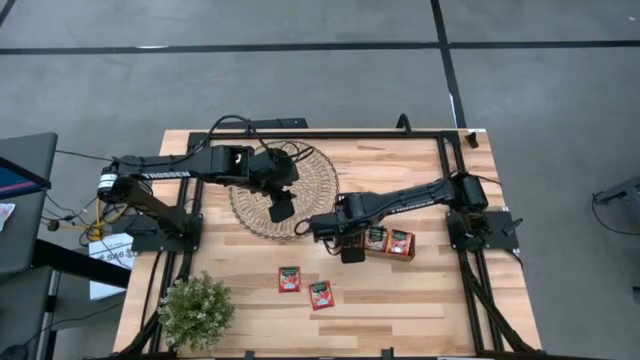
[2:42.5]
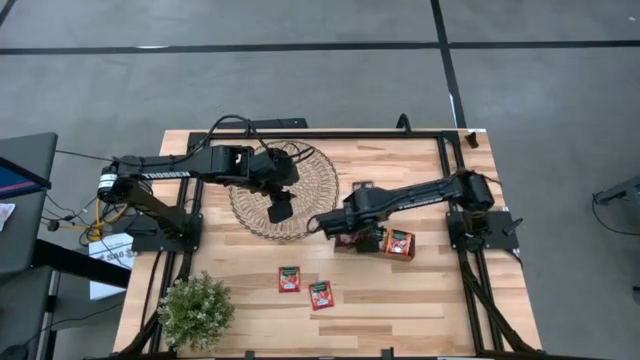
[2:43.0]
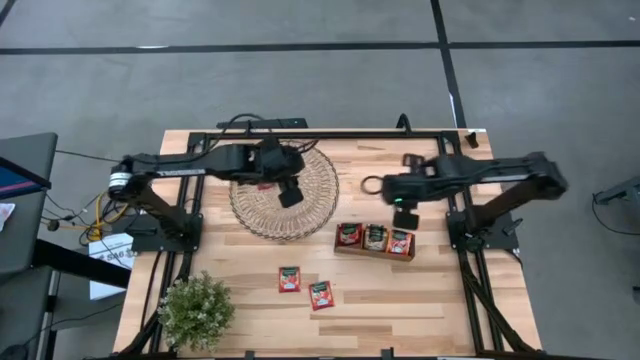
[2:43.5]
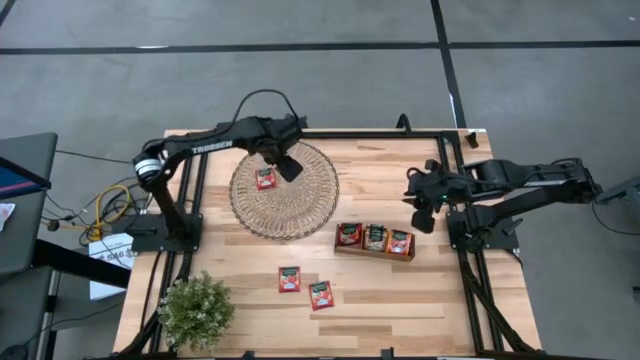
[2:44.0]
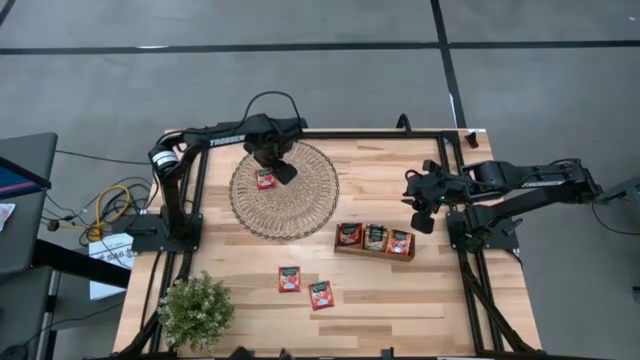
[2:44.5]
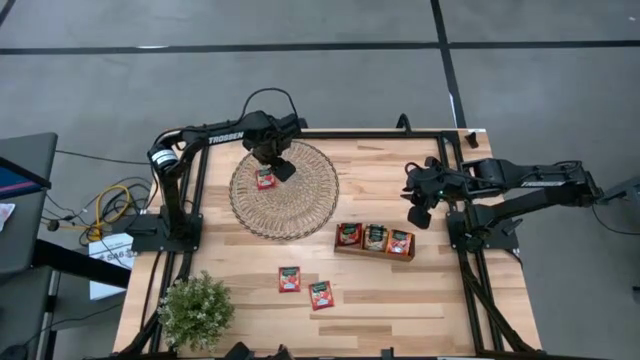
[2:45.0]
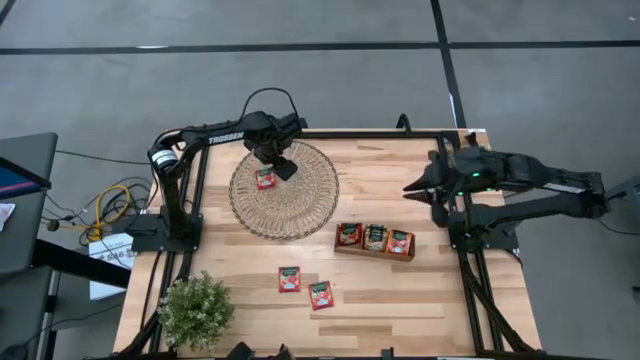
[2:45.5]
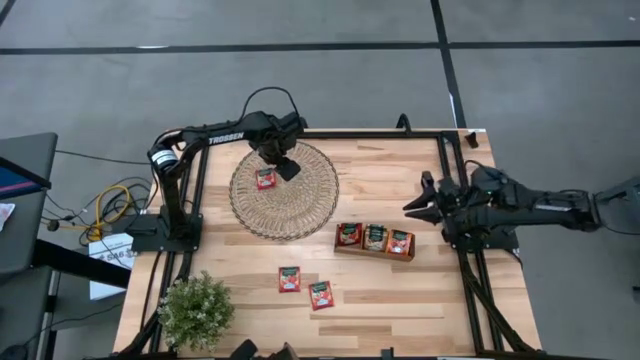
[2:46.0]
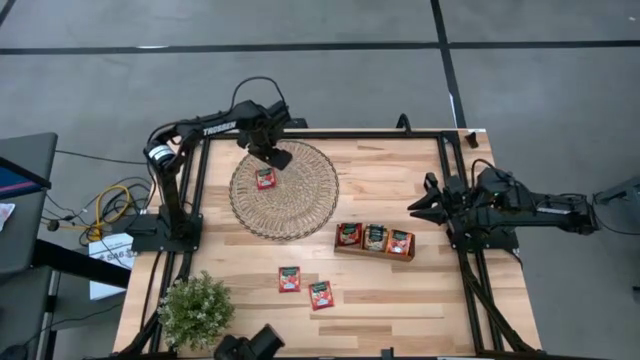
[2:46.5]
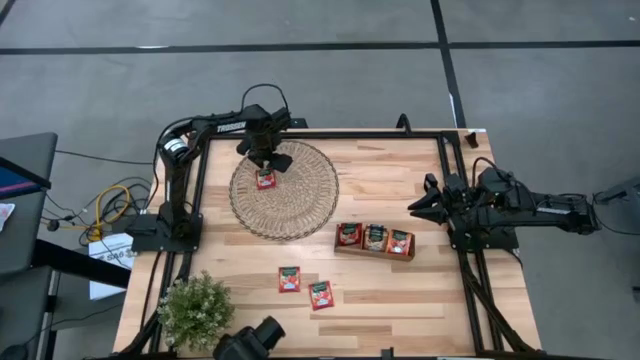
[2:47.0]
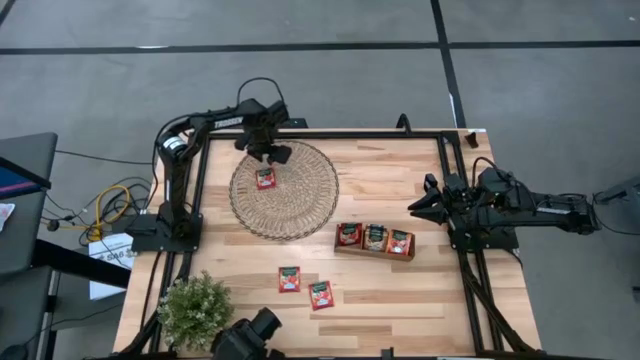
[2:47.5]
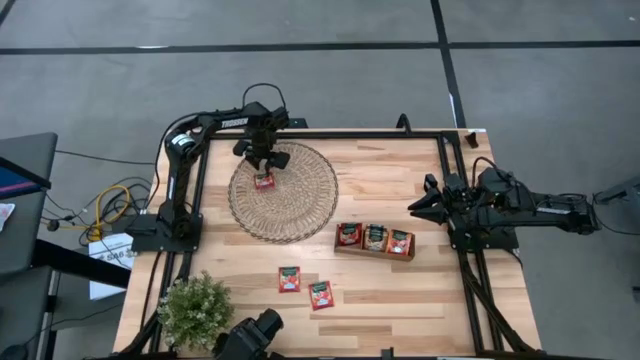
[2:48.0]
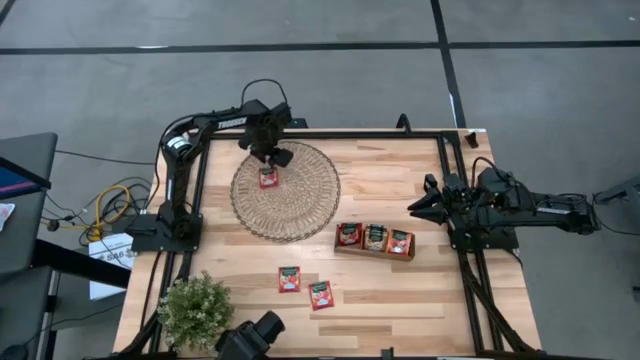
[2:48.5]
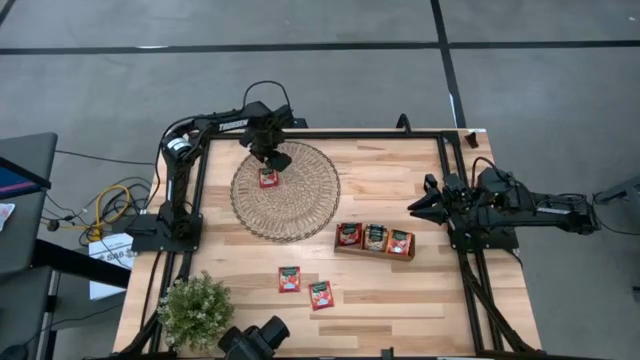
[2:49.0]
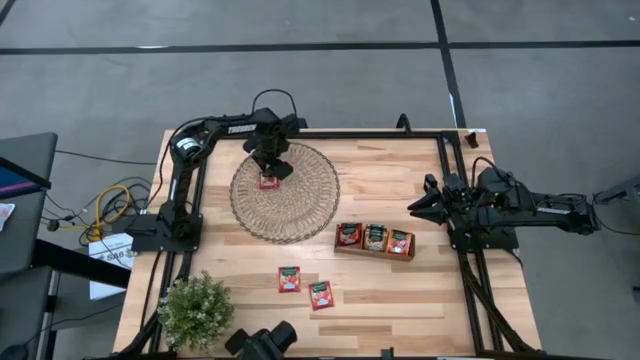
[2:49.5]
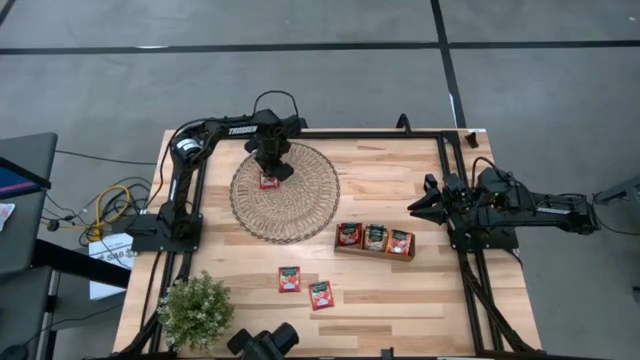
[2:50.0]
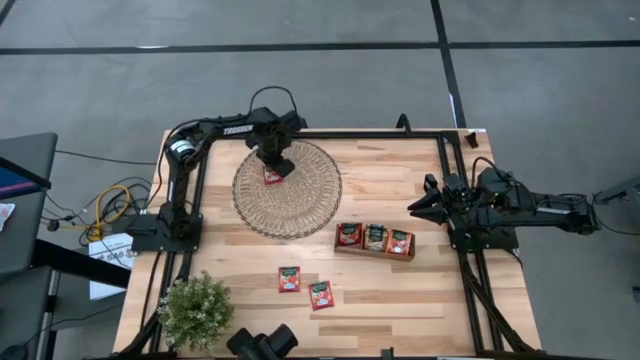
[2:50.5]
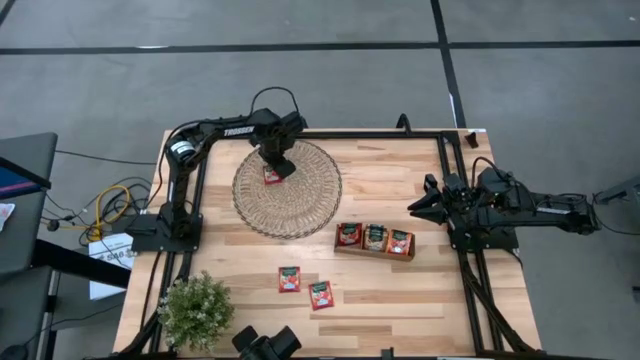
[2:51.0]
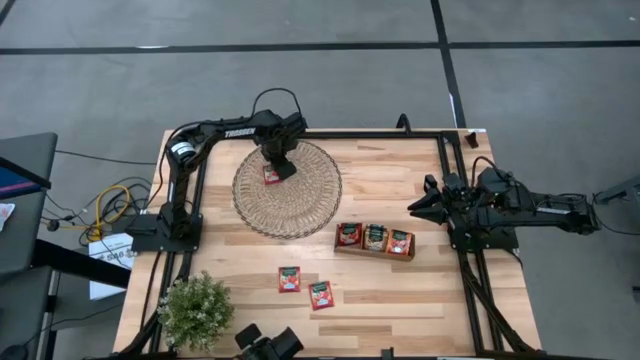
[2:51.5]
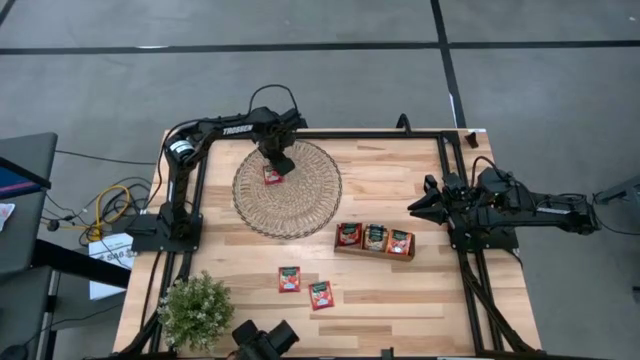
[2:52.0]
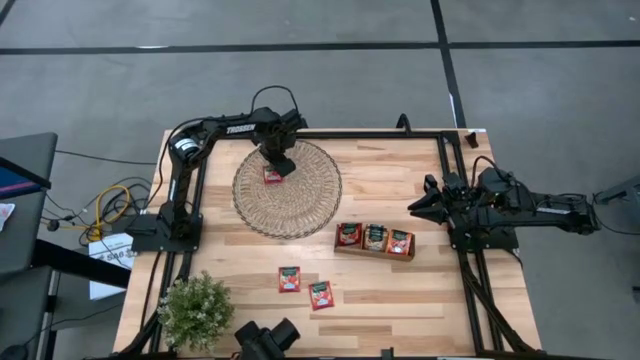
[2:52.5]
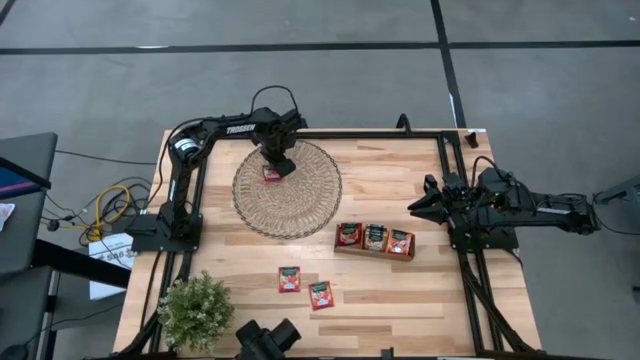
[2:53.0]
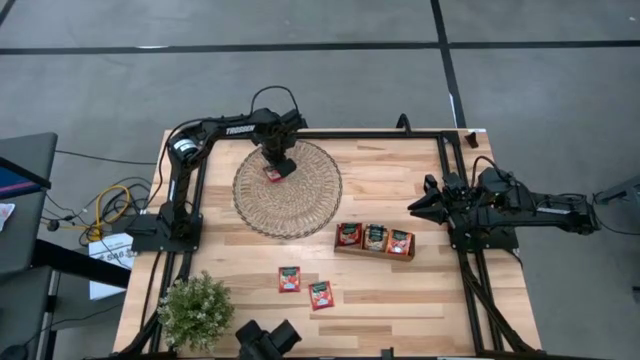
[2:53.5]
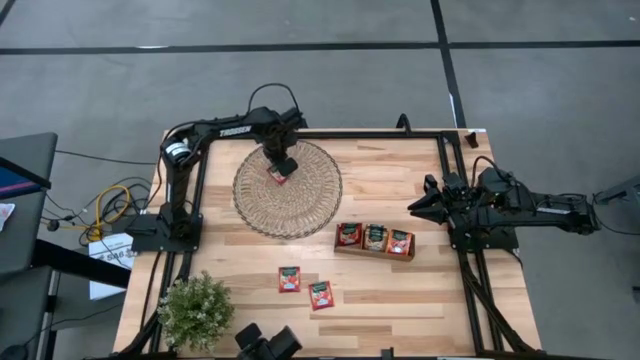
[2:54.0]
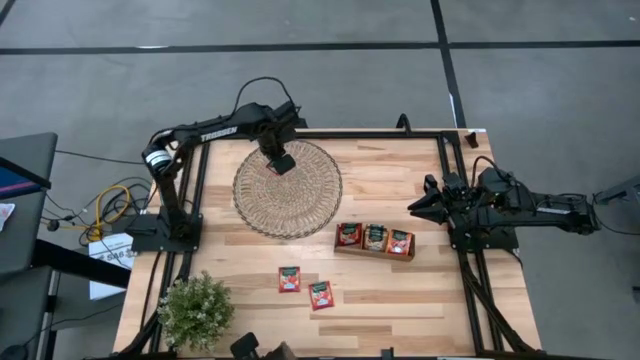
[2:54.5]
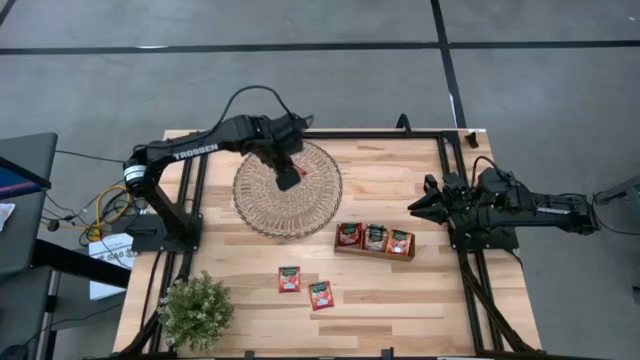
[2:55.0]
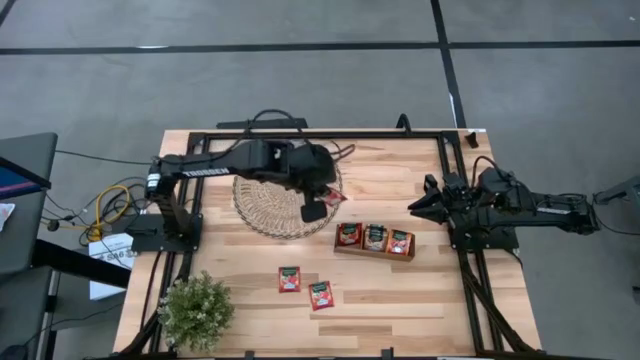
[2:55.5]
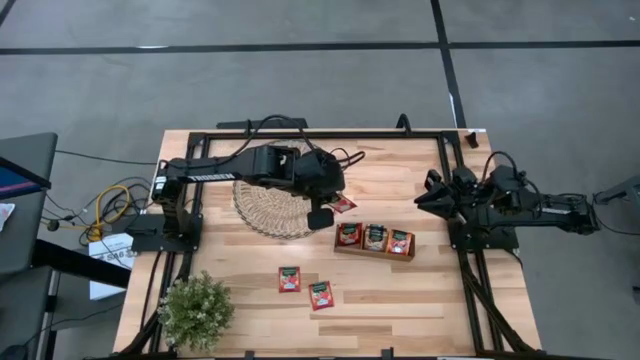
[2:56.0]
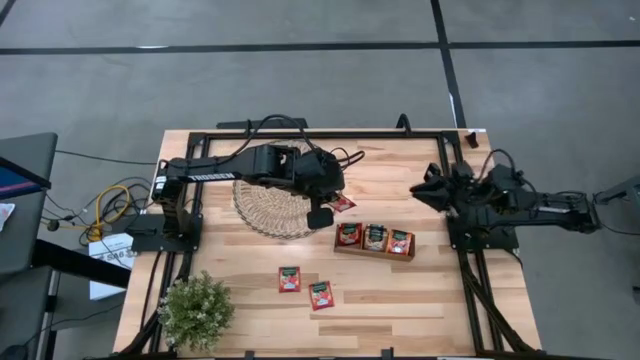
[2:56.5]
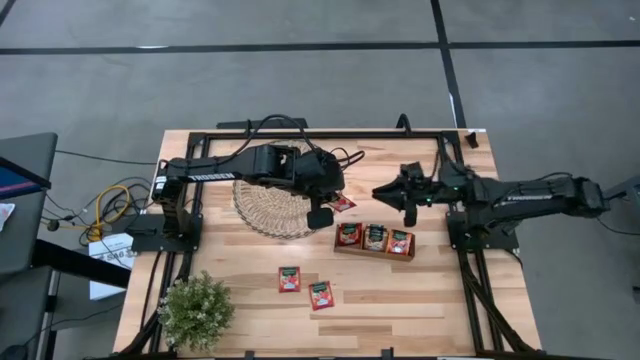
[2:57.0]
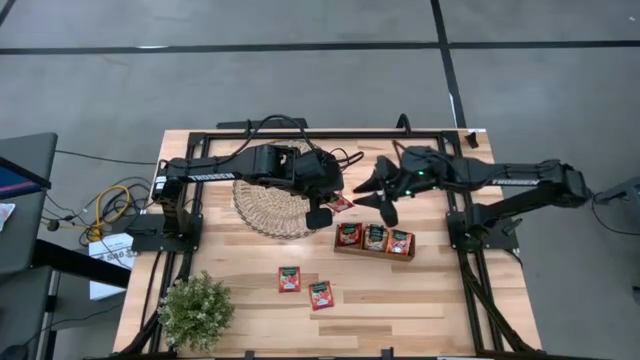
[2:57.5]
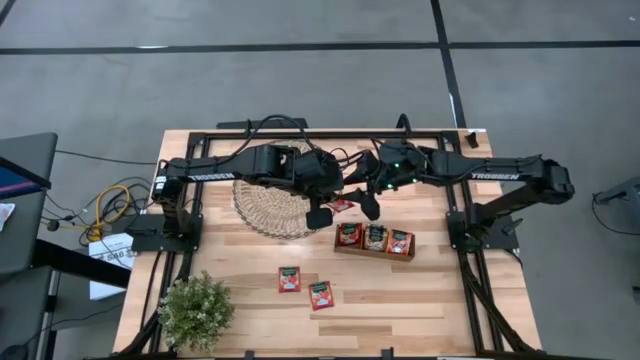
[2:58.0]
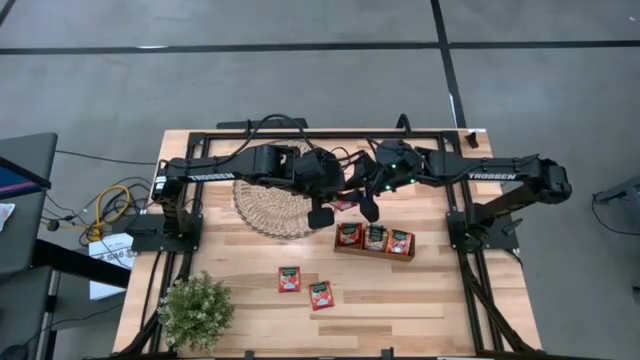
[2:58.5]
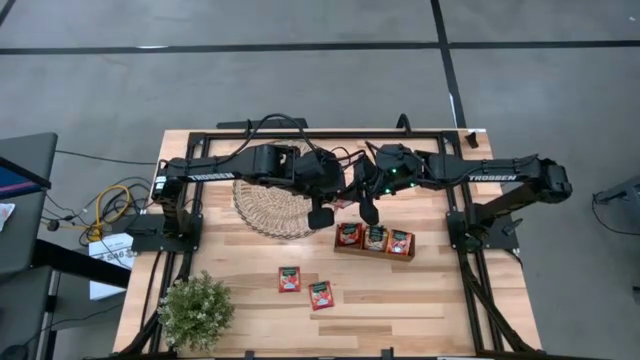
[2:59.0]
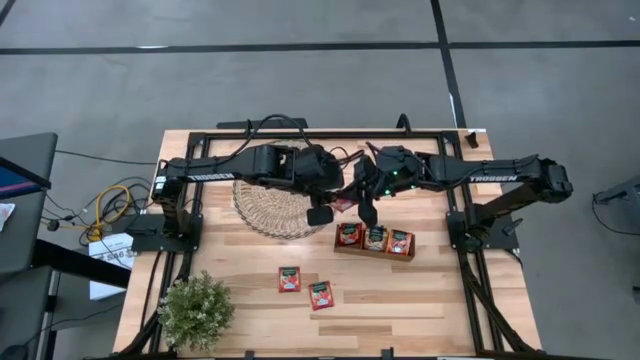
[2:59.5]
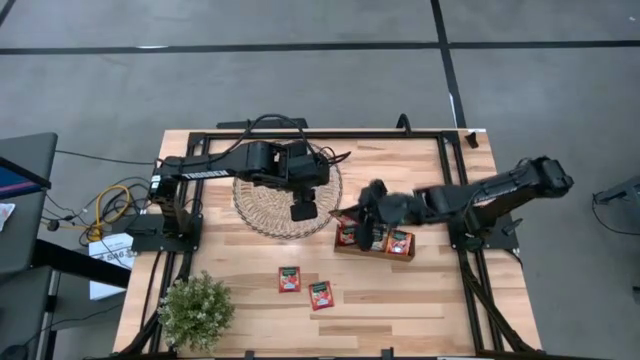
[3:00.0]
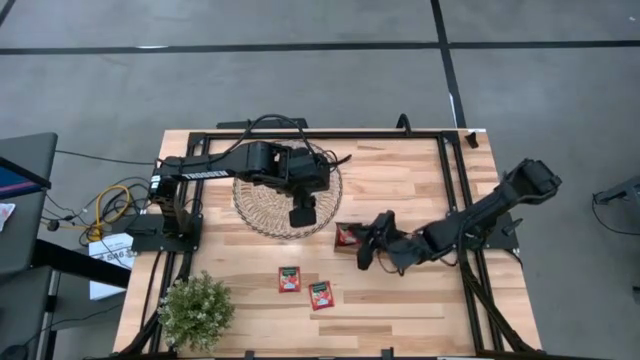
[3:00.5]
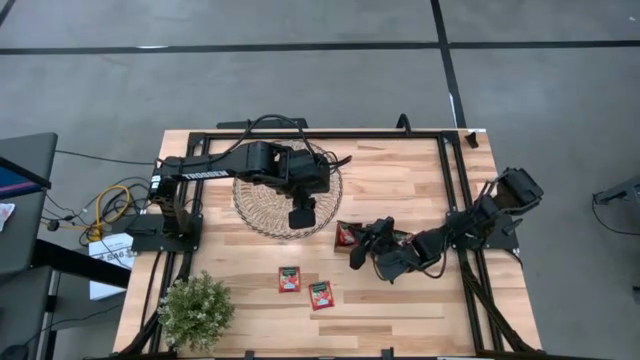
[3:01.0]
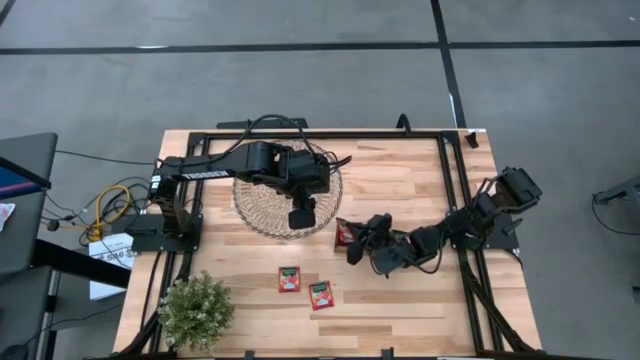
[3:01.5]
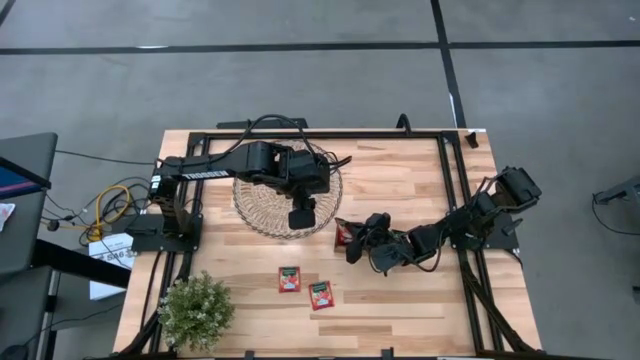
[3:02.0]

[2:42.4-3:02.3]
Task: Pick & Place Tea
Put the red tea bag into the left section of the wooden organizer
